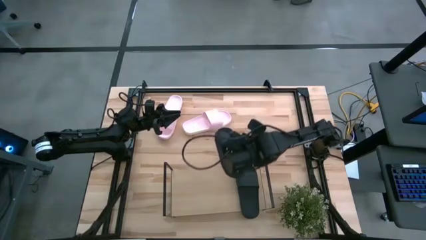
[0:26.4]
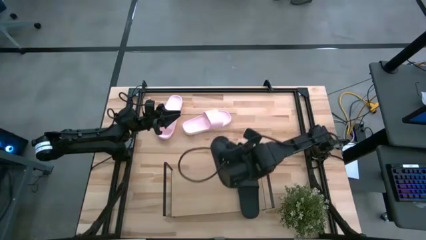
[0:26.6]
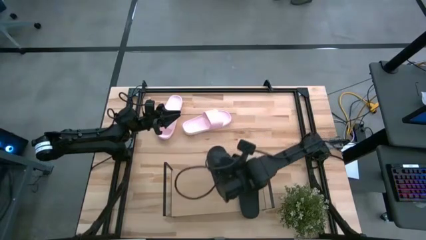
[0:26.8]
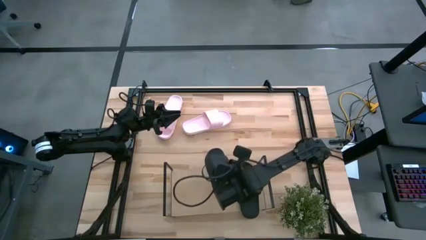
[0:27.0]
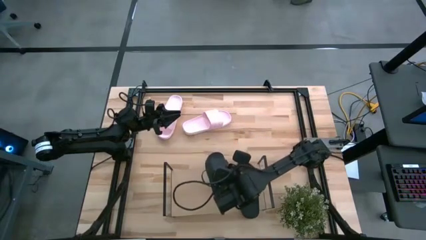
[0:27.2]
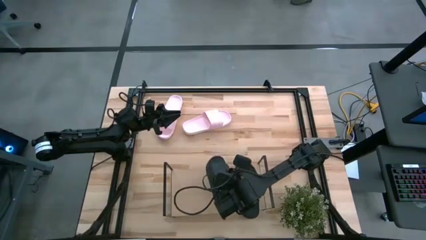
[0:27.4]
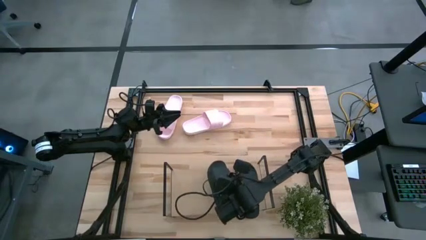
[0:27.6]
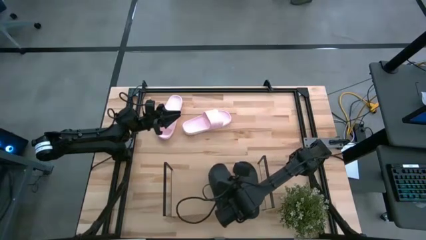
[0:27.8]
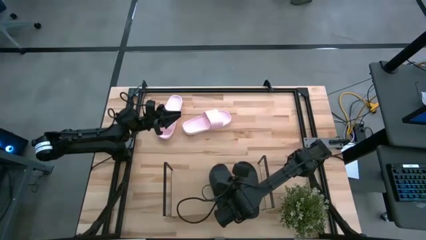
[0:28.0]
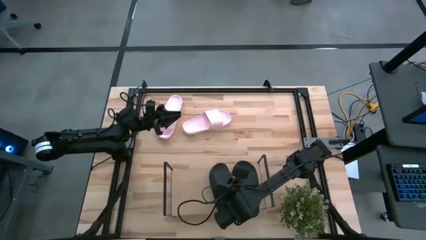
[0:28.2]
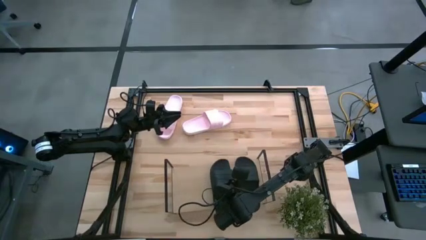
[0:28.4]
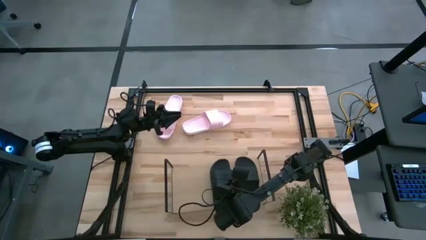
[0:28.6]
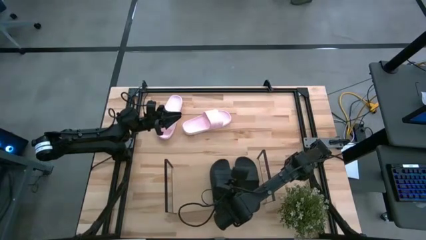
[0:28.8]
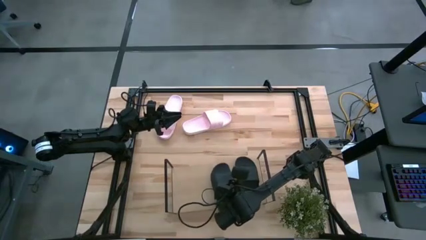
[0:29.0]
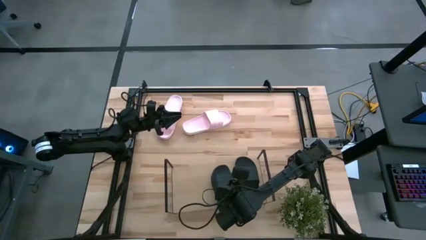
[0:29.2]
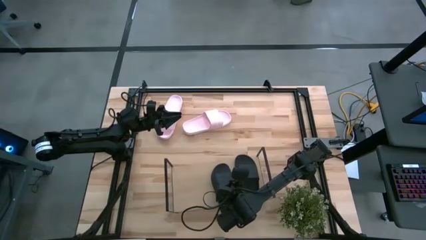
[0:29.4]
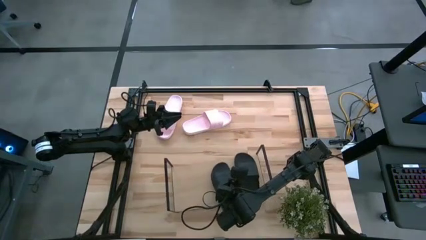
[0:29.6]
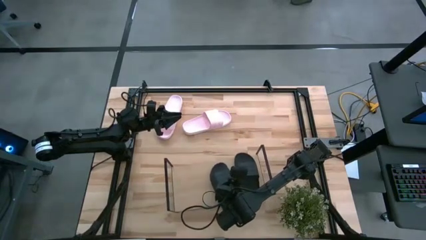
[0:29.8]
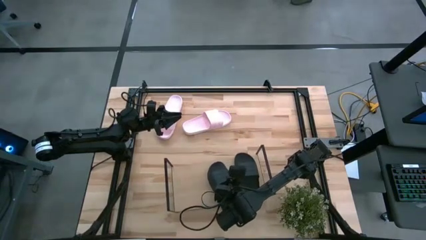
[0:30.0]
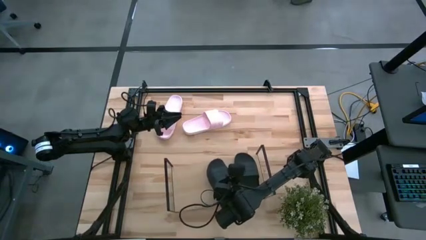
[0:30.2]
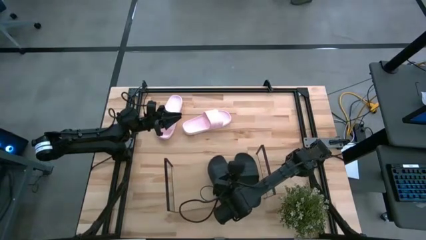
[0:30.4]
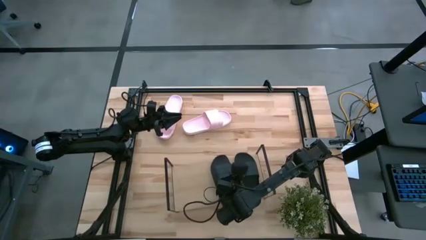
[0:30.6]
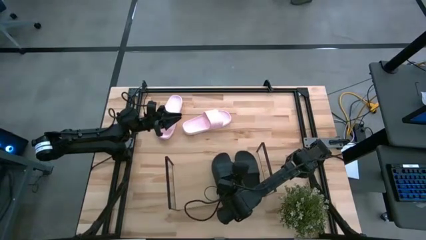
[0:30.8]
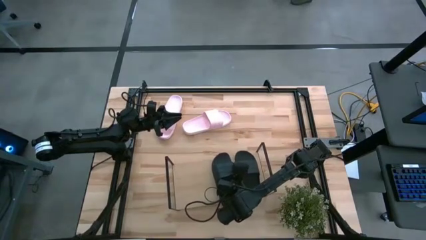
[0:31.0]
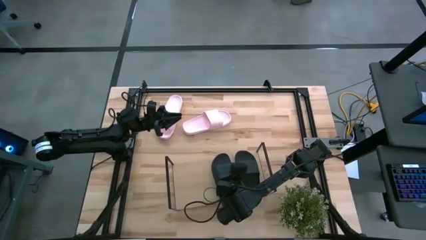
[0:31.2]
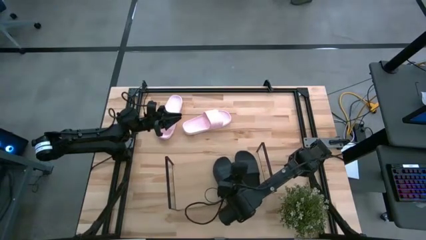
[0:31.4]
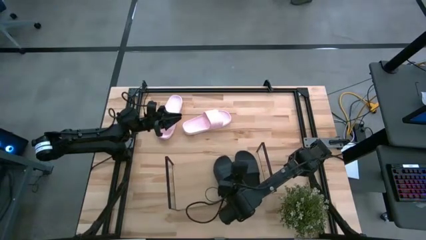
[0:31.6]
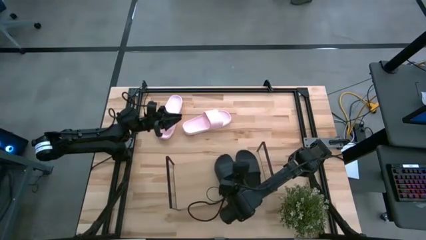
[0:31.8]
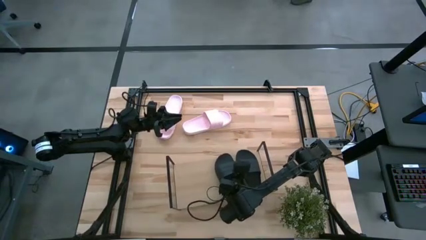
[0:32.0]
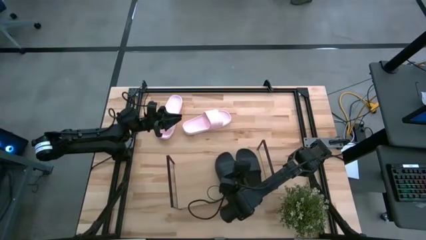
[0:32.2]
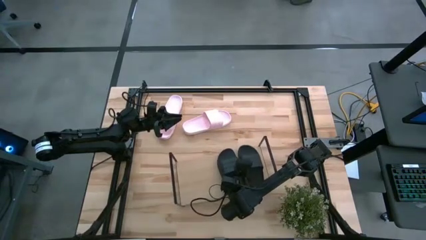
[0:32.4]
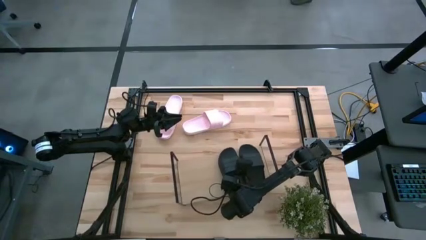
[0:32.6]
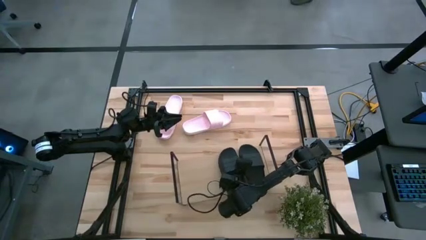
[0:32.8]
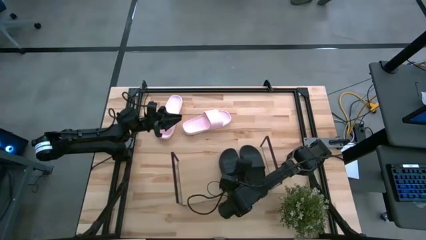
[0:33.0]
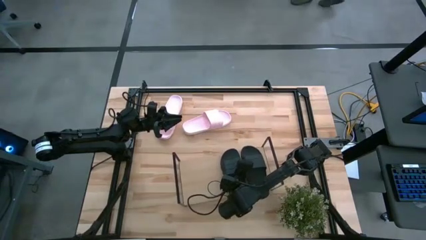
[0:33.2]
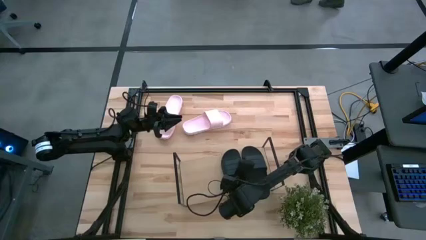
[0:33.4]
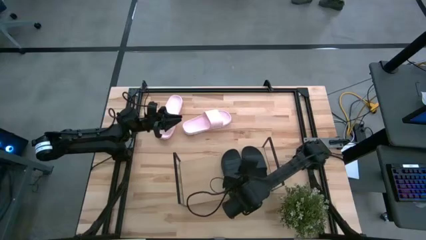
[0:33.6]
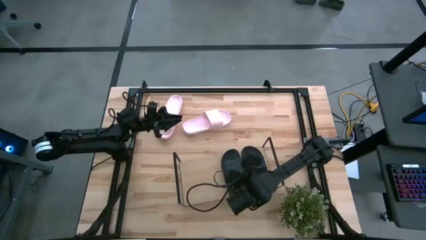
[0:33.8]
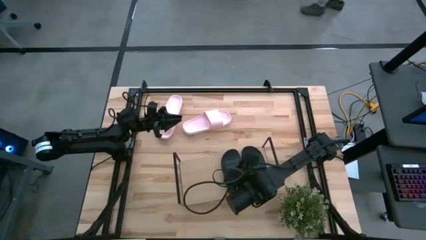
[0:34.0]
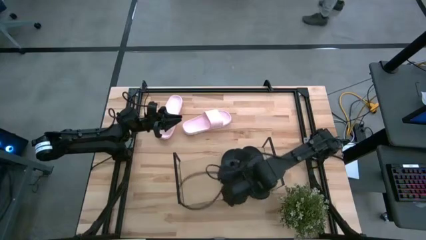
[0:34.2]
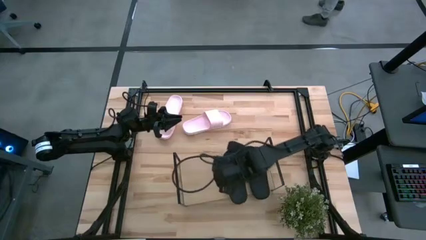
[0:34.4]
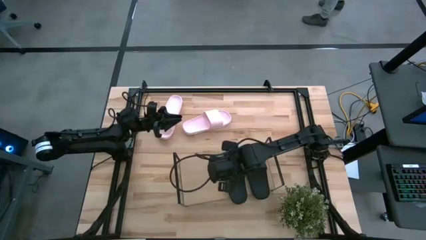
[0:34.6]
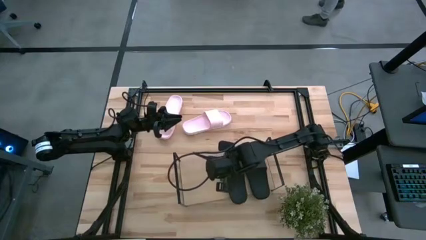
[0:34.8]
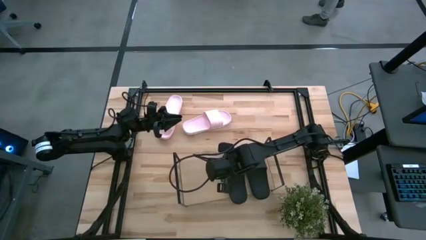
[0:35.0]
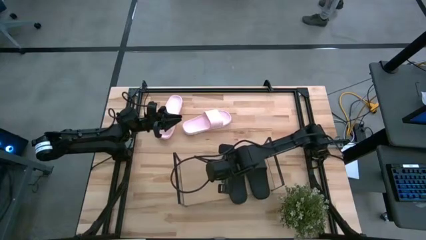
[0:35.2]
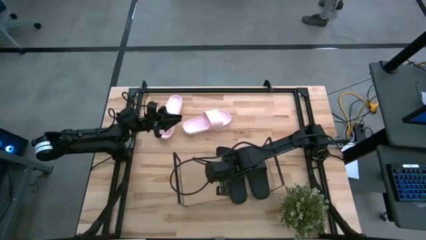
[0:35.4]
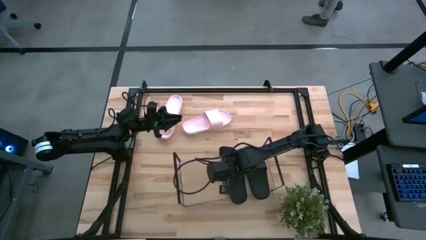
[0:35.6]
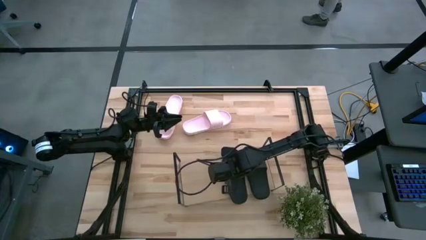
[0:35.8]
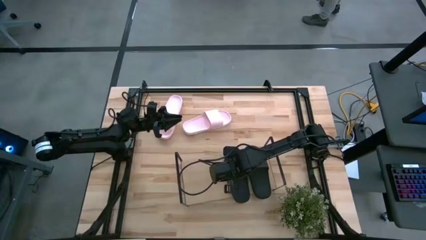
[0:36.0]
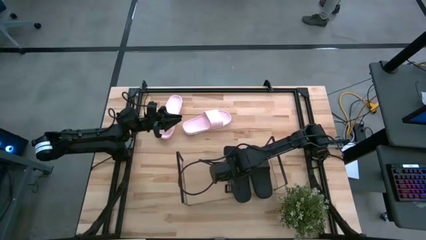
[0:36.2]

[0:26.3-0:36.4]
Task: Pick and place slides into the shelf
Put the black slide on the shelf
